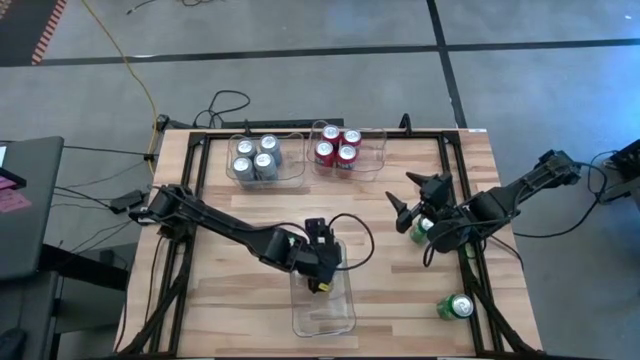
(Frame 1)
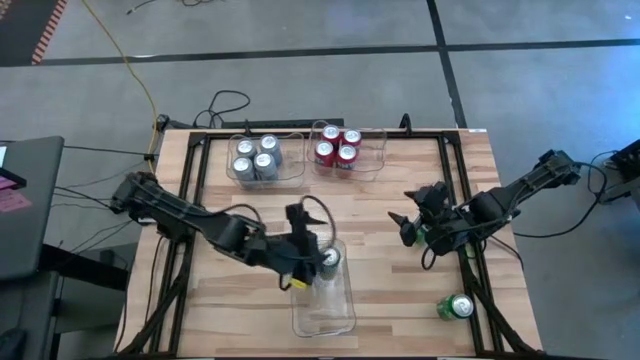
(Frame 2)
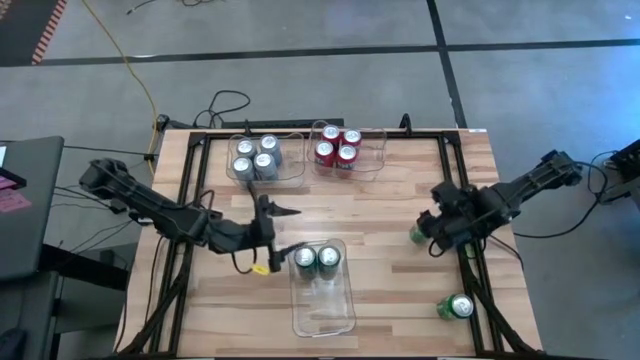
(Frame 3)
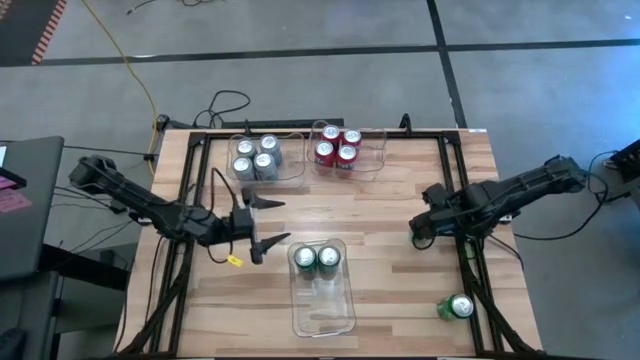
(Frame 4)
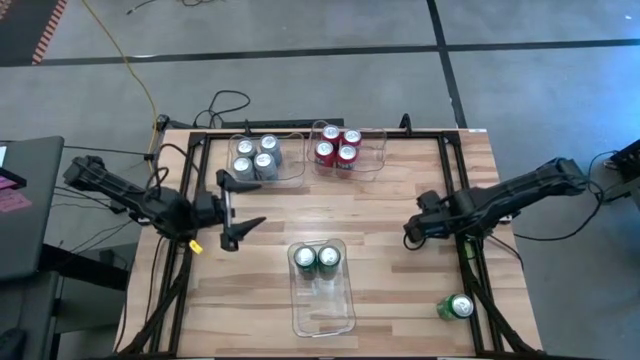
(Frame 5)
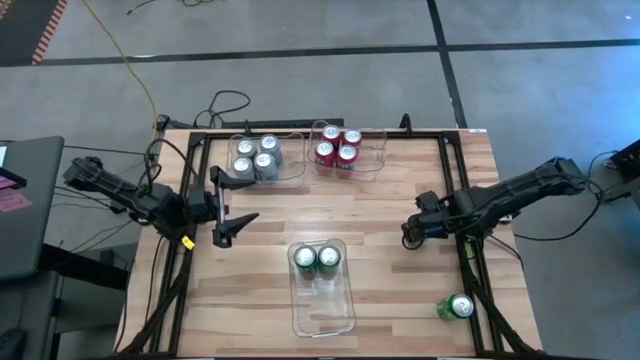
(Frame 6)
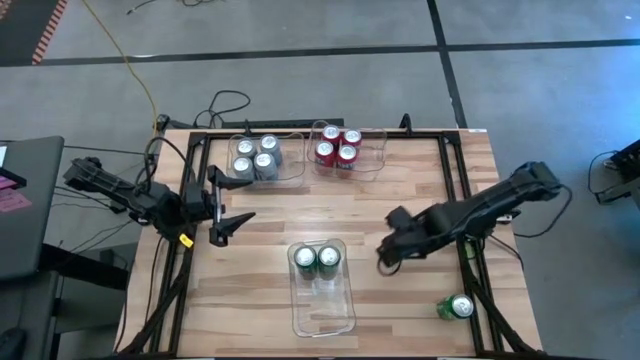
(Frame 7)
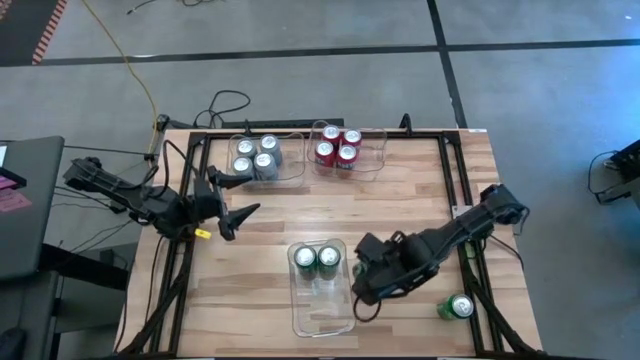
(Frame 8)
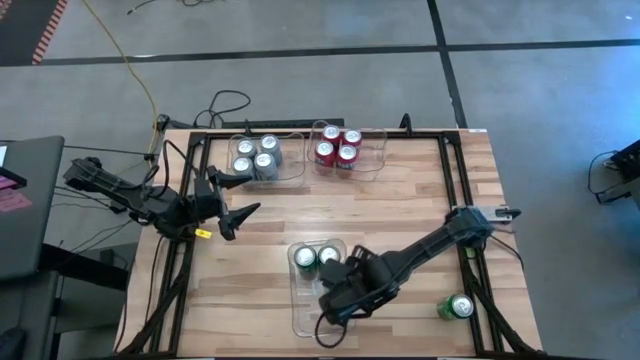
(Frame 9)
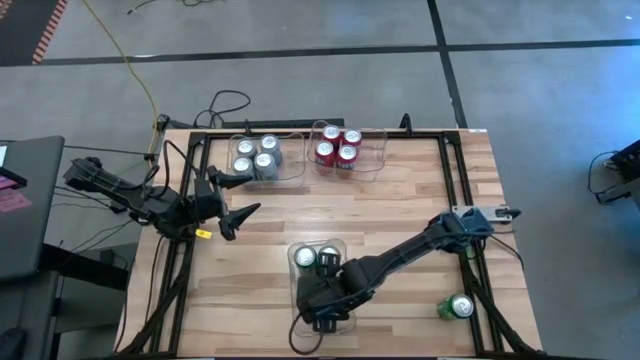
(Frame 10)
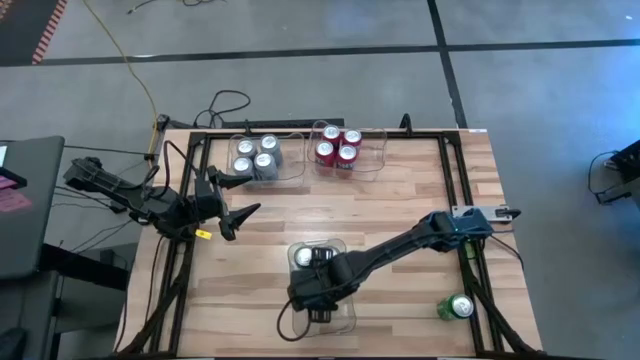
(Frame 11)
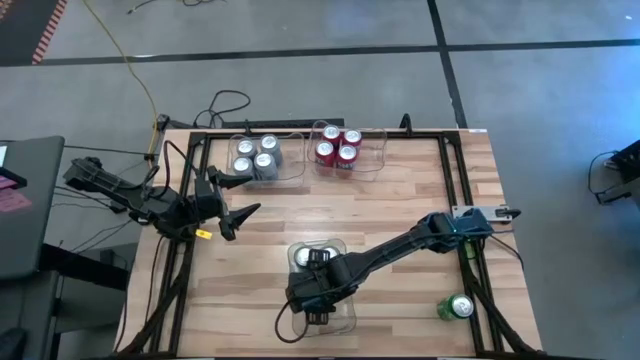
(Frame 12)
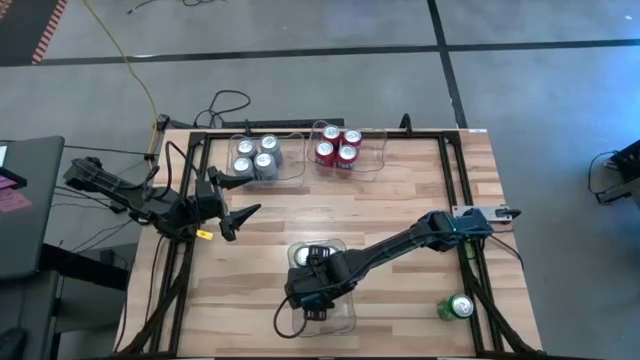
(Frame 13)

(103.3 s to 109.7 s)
Task: Sort soda cans
Put the top green soda can into the bottom transparent bin

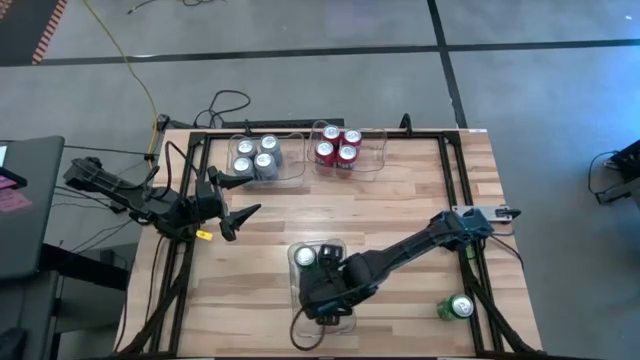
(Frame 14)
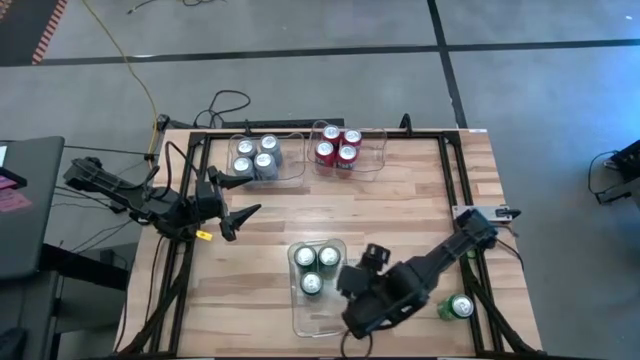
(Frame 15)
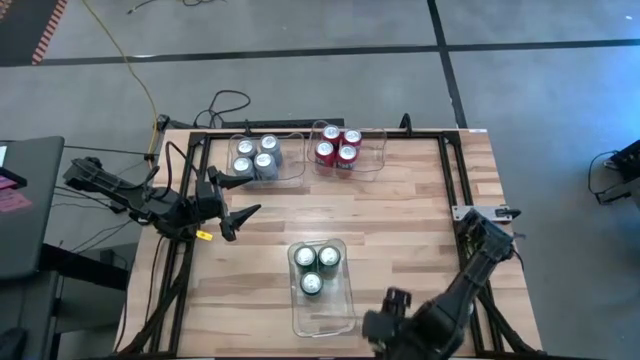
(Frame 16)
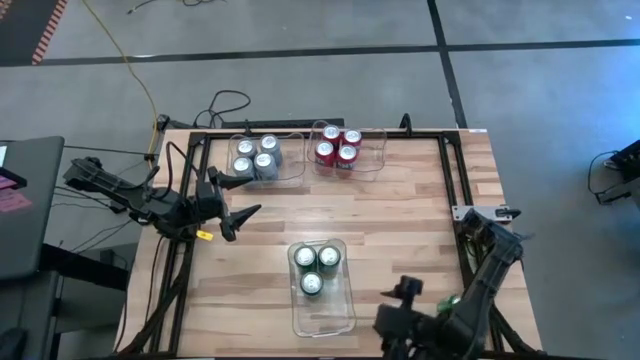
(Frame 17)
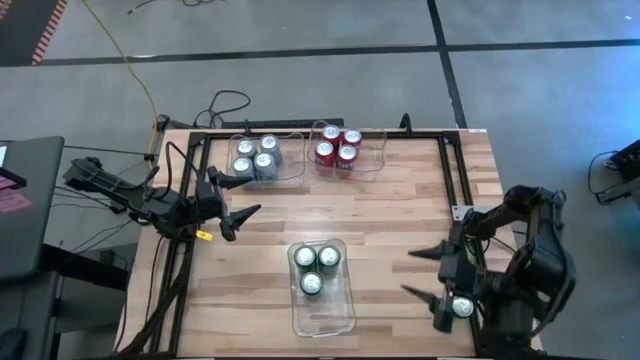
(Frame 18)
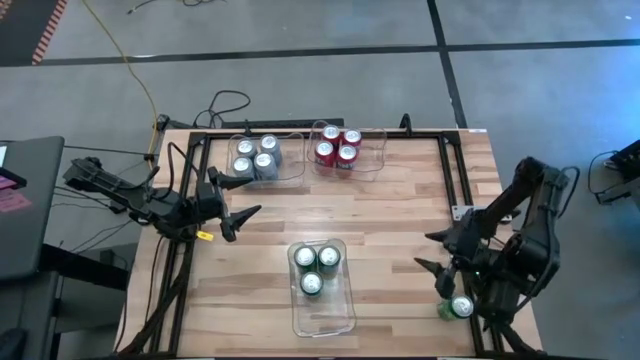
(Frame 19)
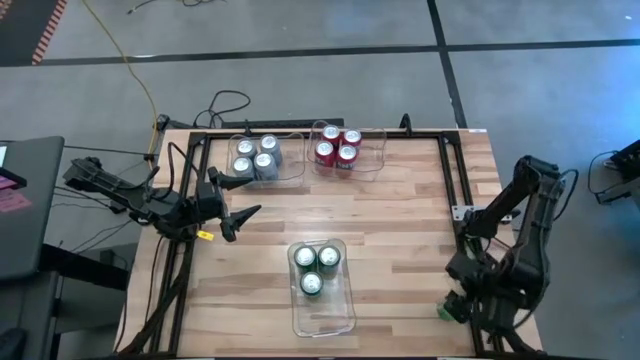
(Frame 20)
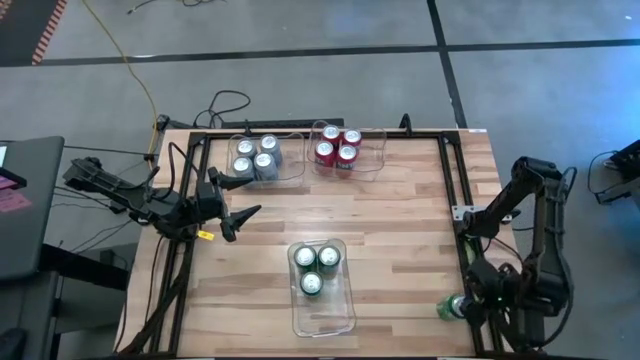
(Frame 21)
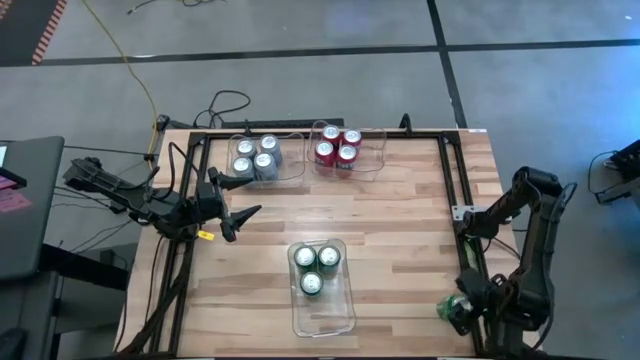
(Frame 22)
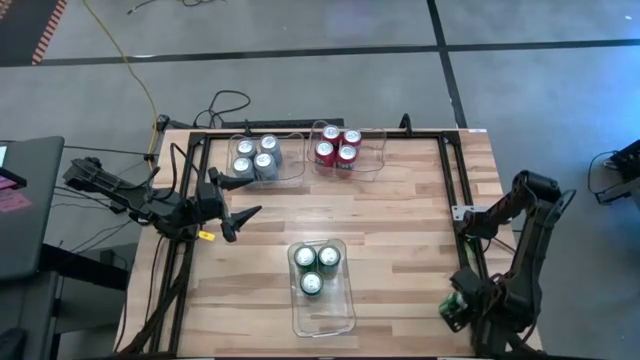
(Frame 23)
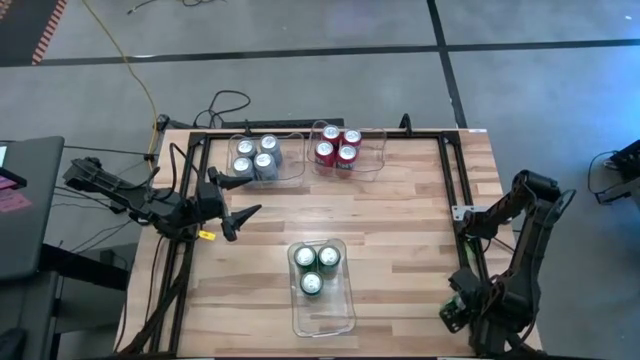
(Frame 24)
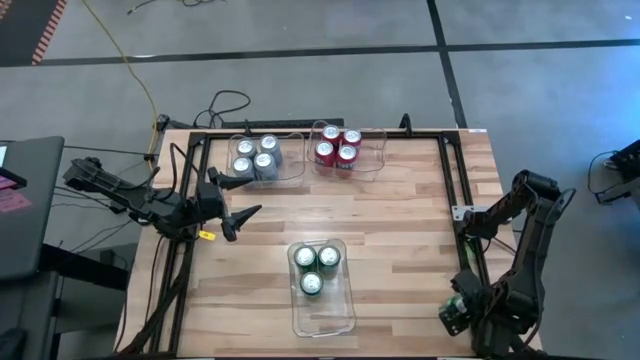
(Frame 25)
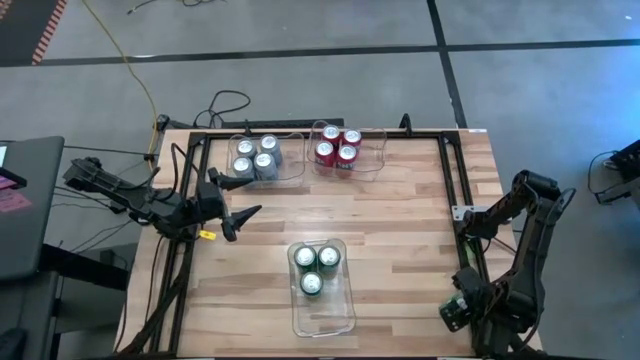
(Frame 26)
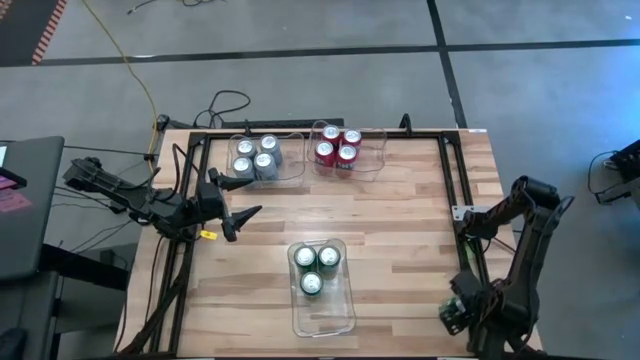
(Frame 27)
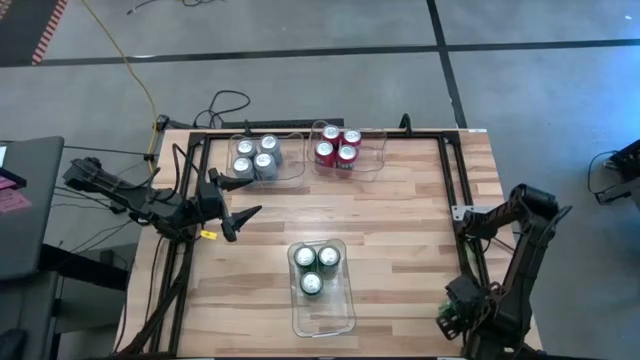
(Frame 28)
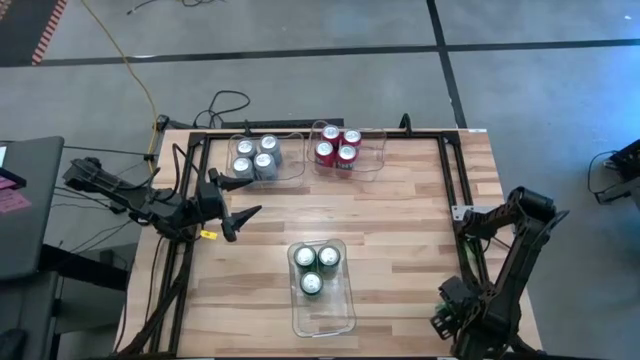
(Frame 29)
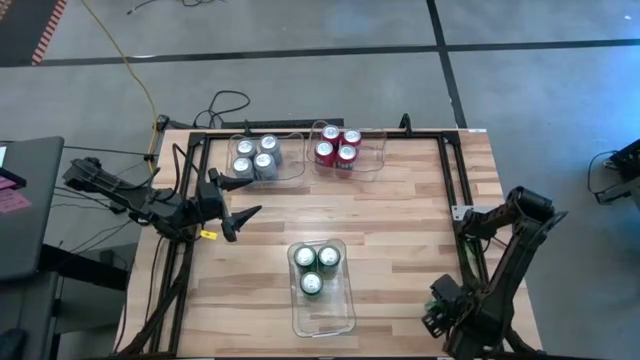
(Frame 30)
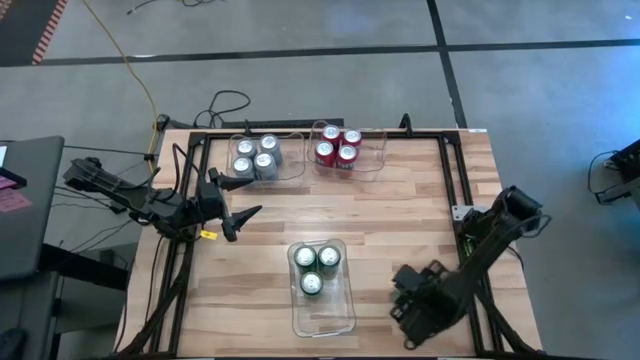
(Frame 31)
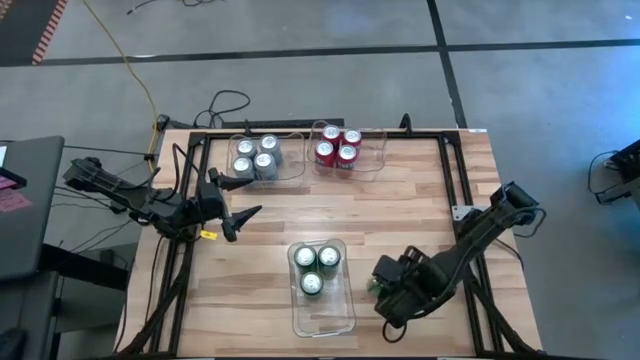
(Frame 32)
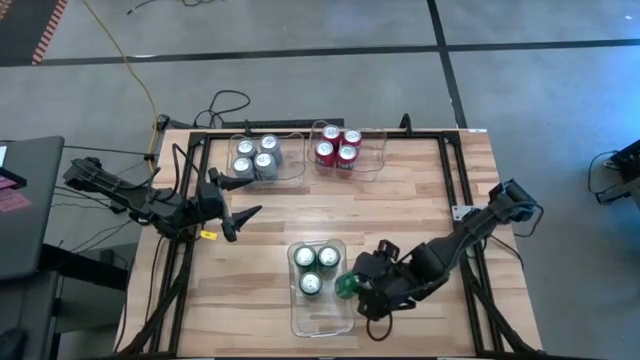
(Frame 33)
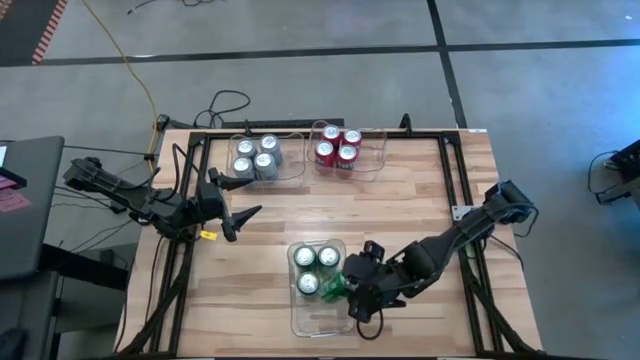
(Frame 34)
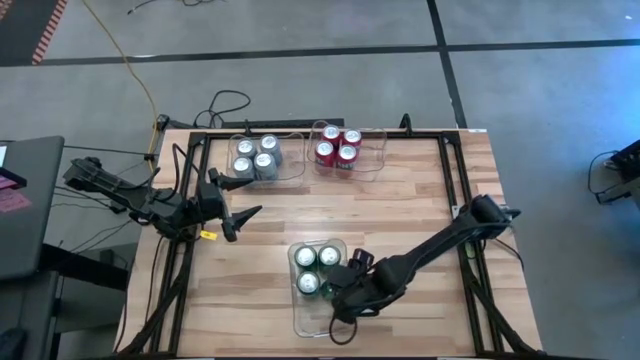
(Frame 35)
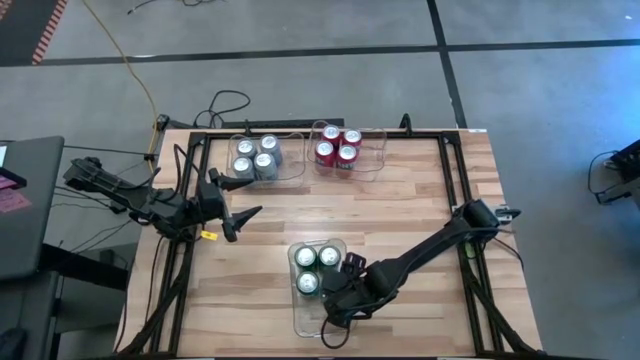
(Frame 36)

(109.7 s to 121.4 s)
Put the green soda can into the bottom transparent bin
